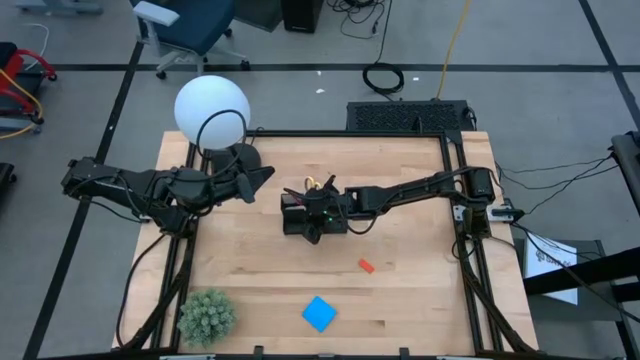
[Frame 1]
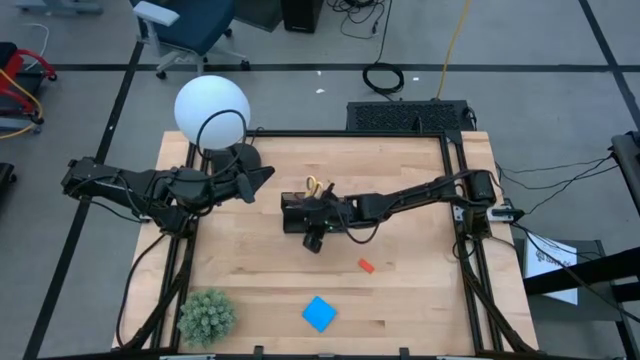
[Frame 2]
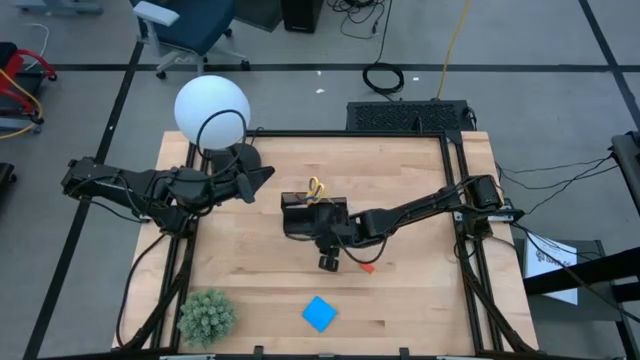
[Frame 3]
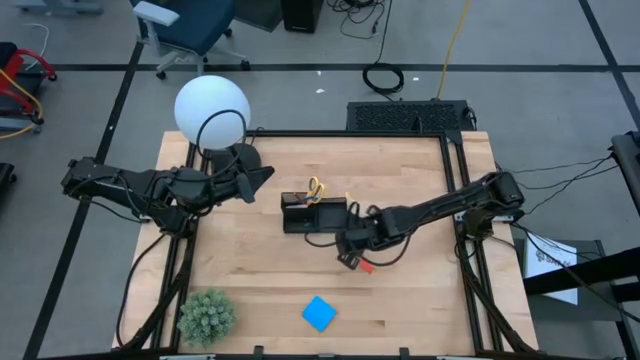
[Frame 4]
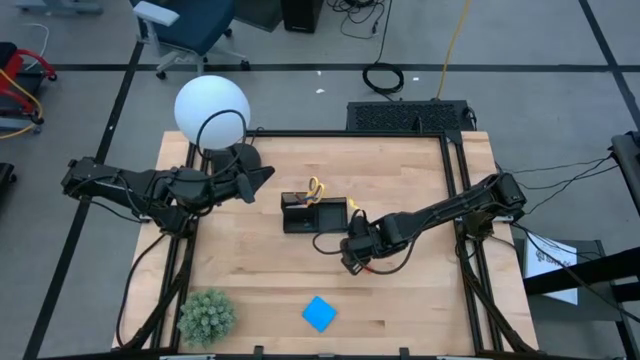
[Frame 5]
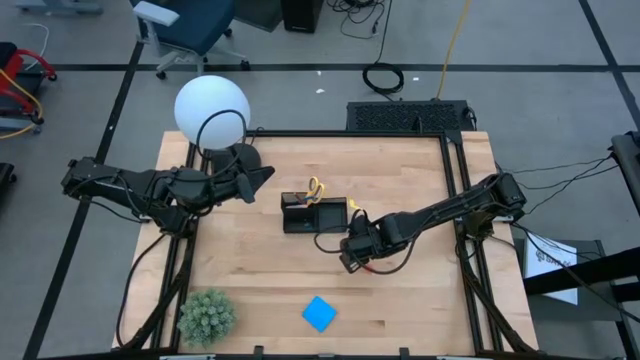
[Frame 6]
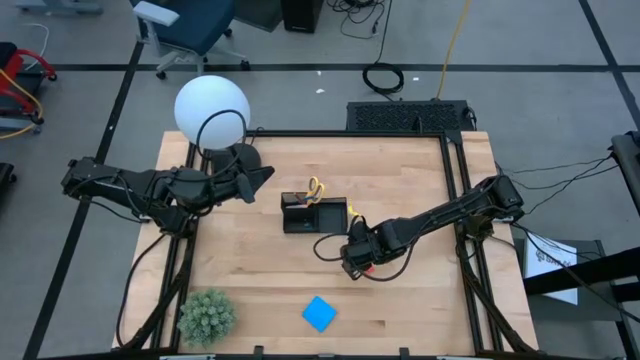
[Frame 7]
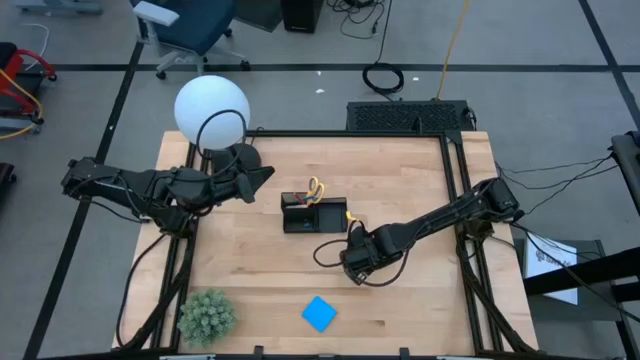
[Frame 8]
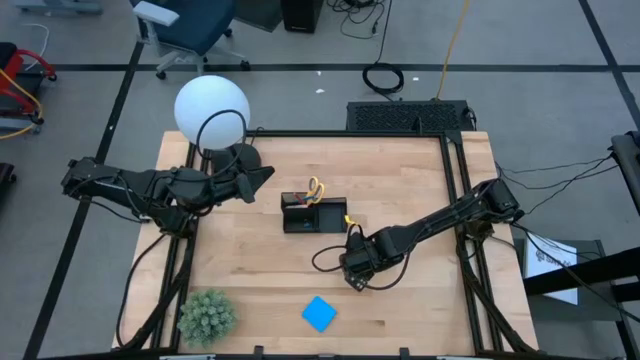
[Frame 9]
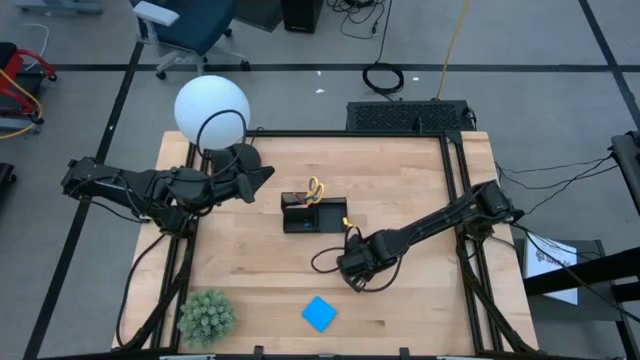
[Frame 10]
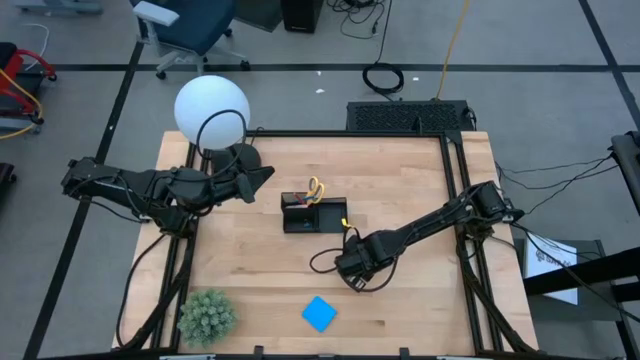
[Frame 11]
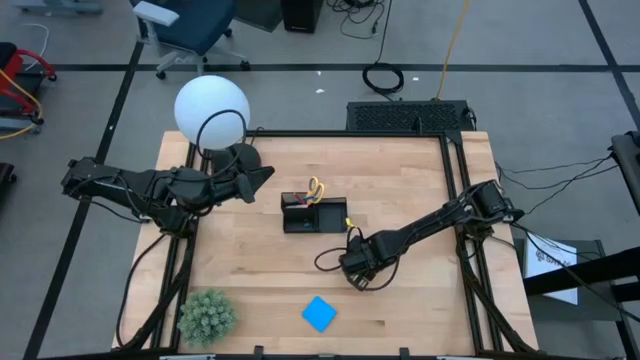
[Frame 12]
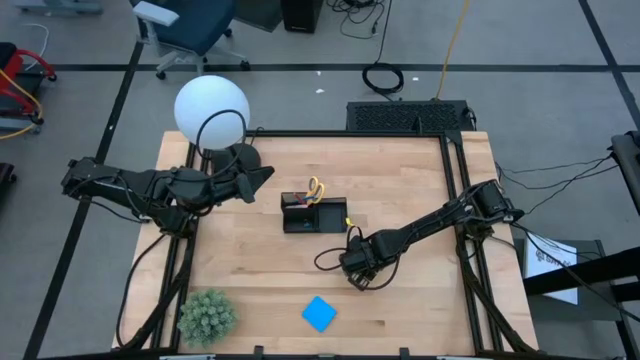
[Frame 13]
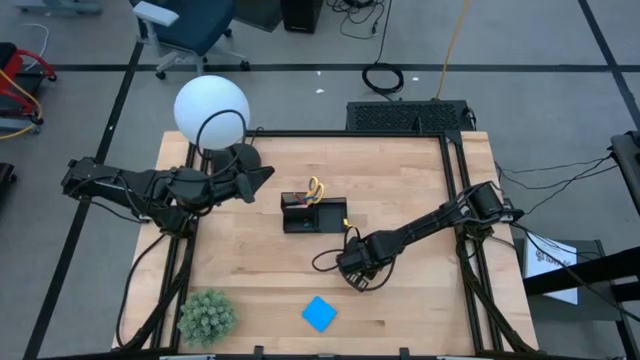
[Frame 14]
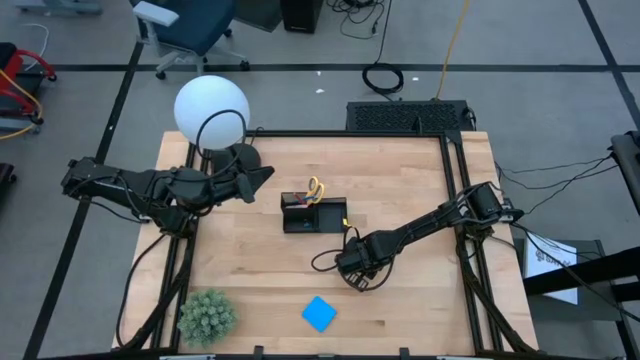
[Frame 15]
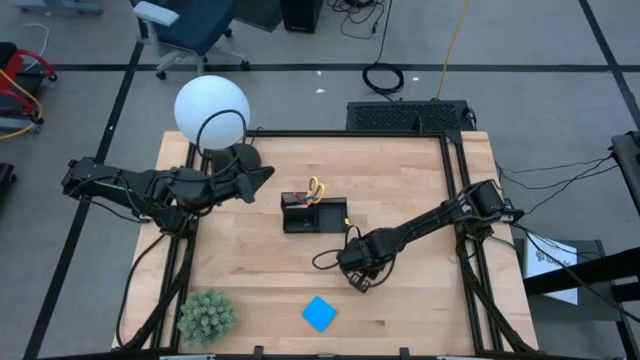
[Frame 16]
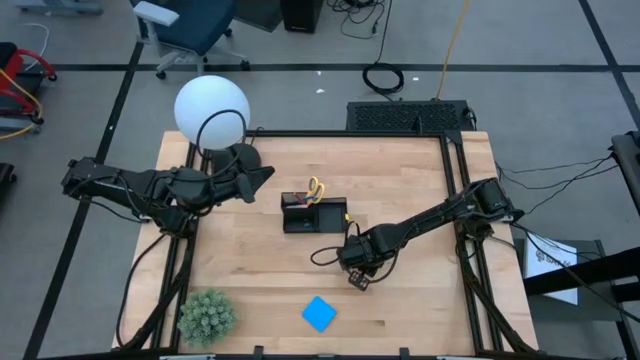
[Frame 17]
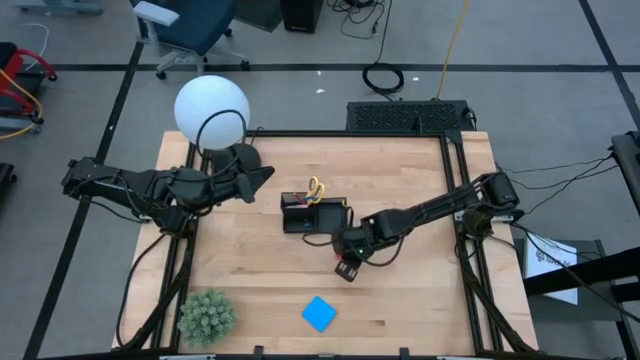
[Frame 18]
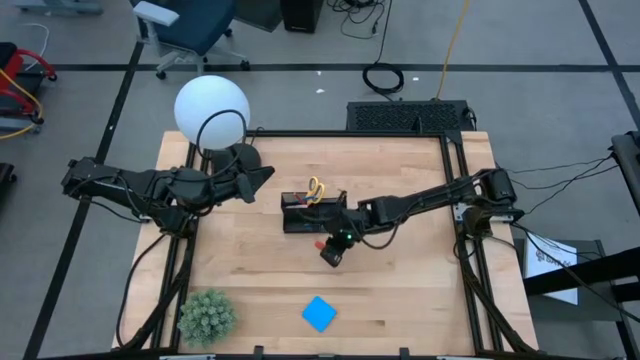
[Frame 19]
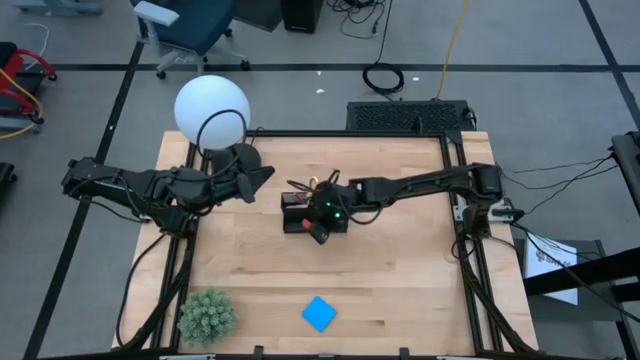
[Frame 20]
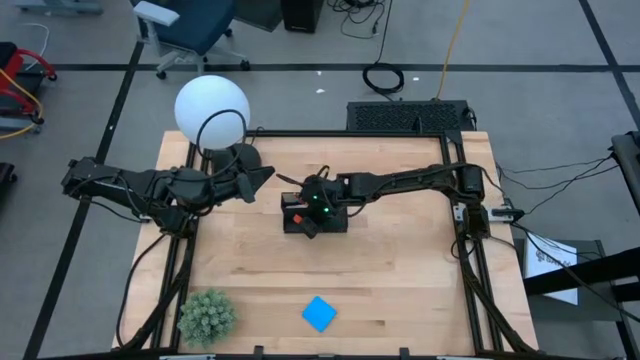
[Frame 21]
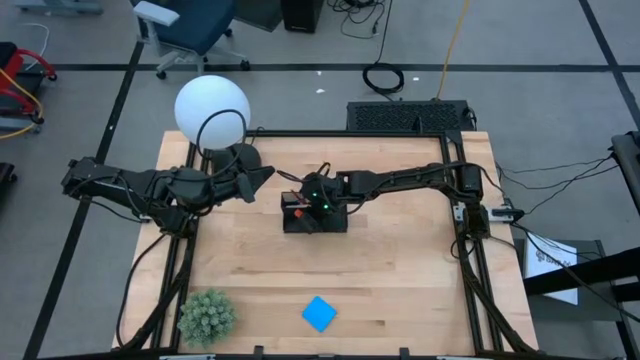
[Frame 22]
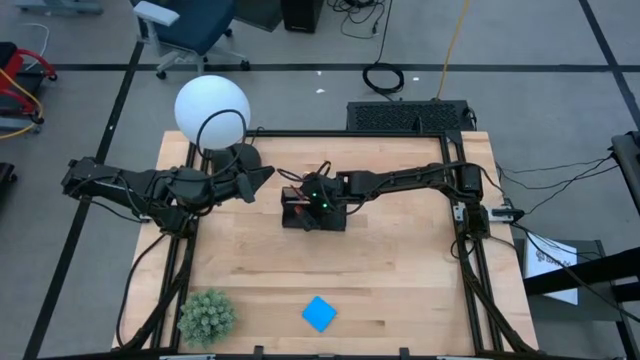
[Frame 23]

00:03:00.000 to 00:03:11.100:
Task: Pick and place office supplies into organizer
Put the orange eraser into the desk organizer

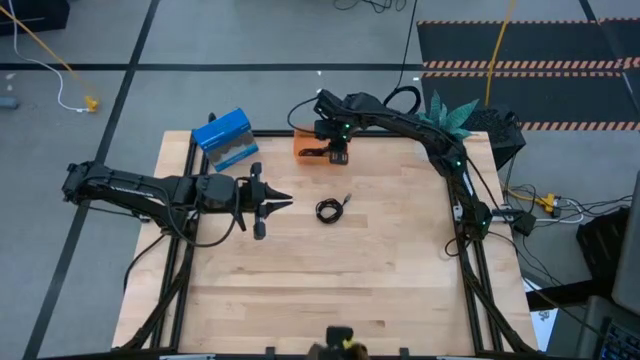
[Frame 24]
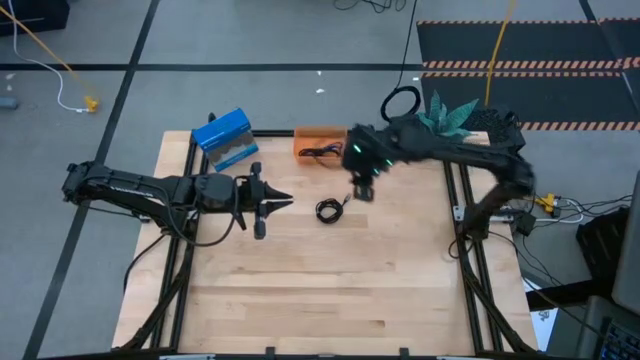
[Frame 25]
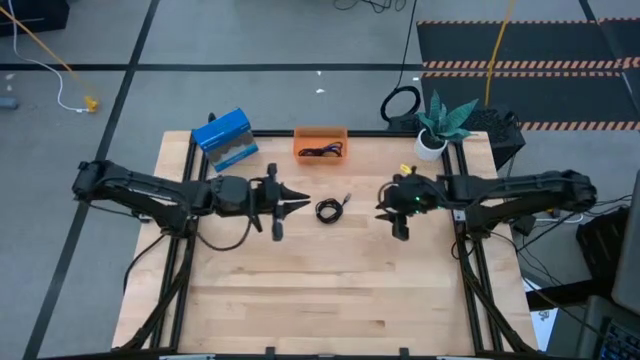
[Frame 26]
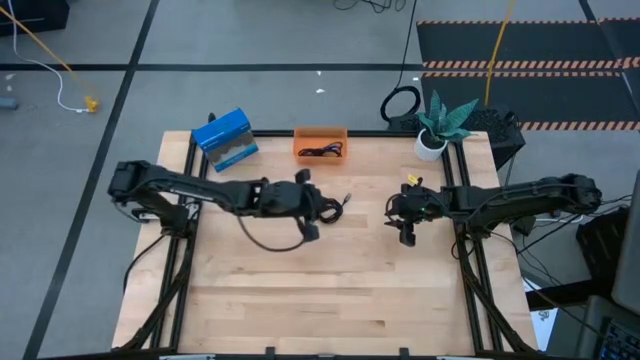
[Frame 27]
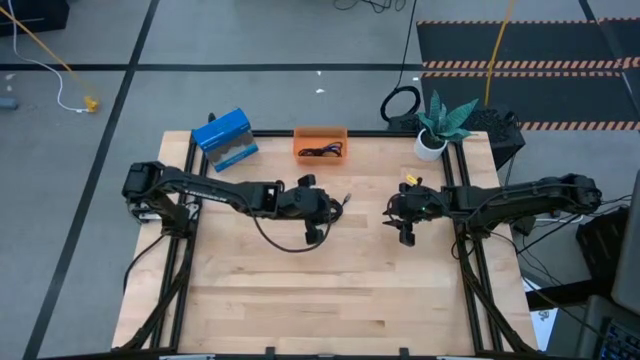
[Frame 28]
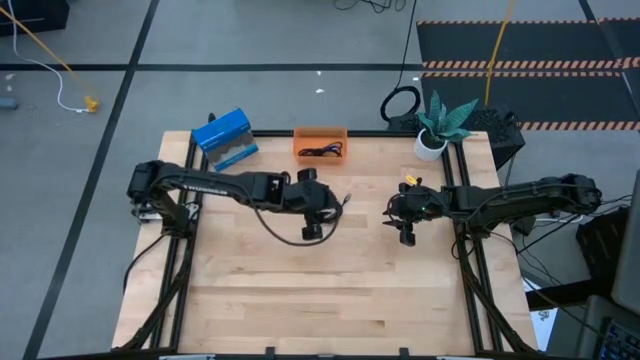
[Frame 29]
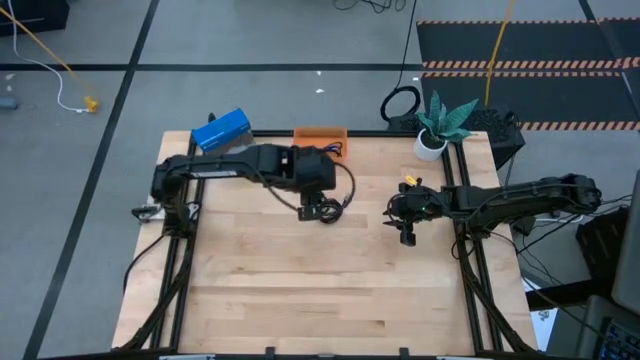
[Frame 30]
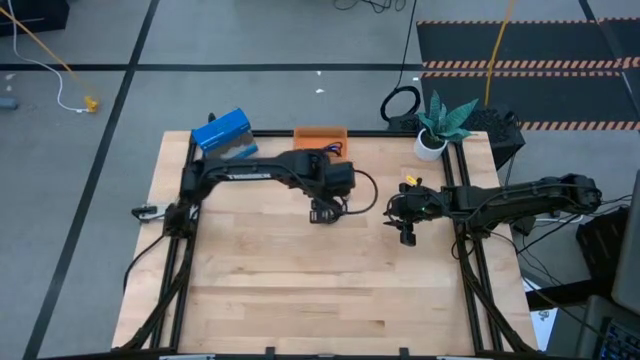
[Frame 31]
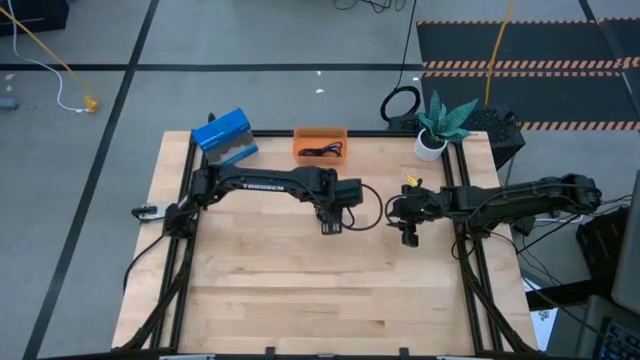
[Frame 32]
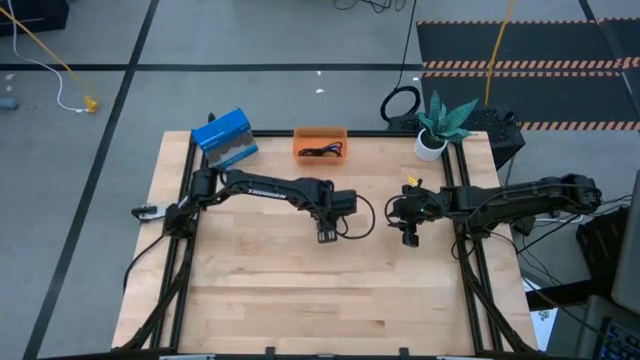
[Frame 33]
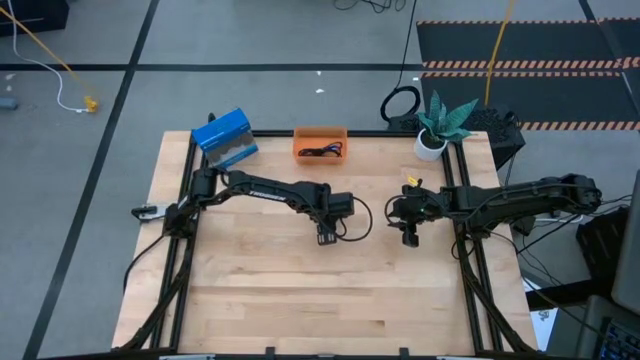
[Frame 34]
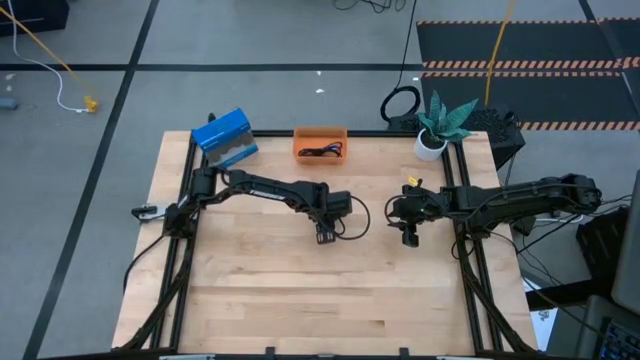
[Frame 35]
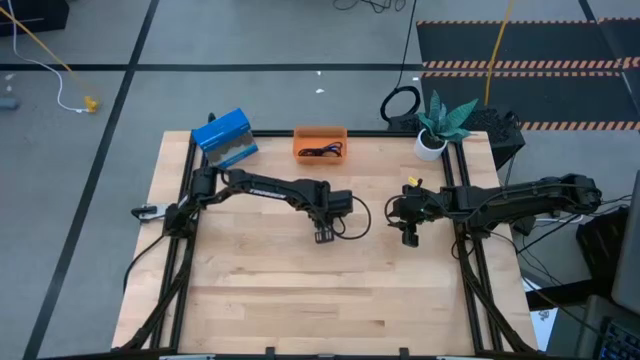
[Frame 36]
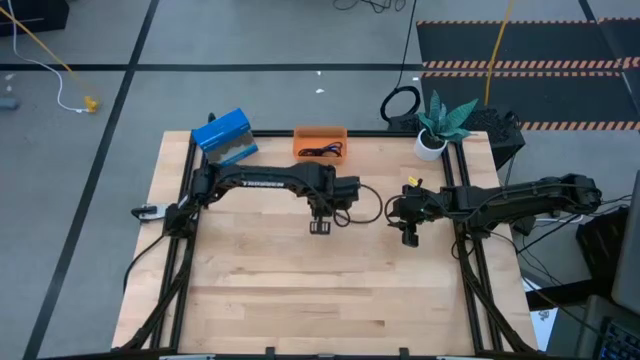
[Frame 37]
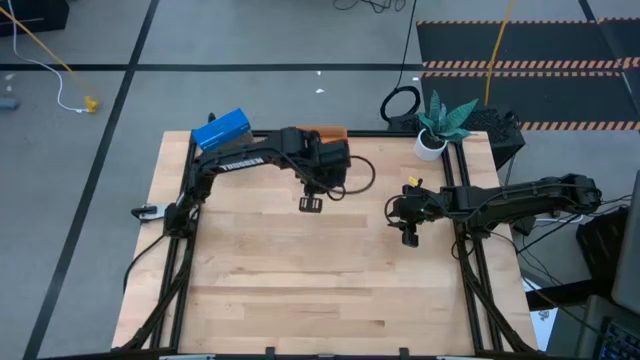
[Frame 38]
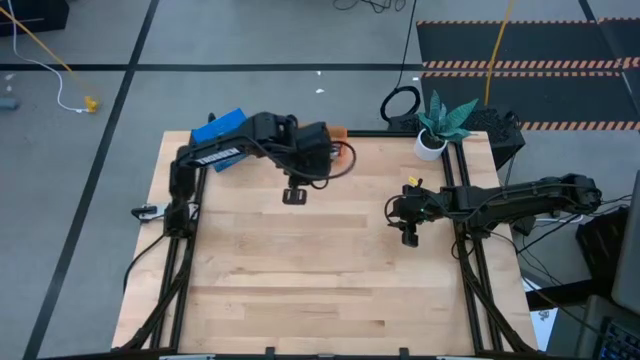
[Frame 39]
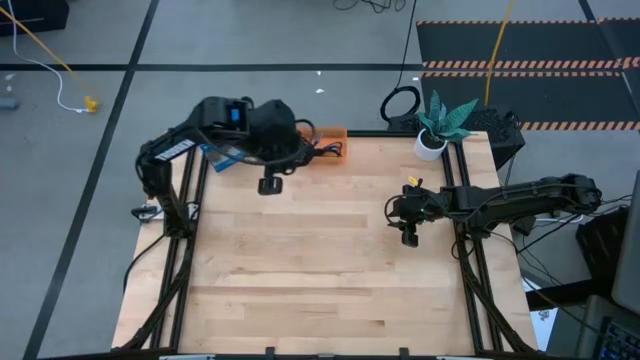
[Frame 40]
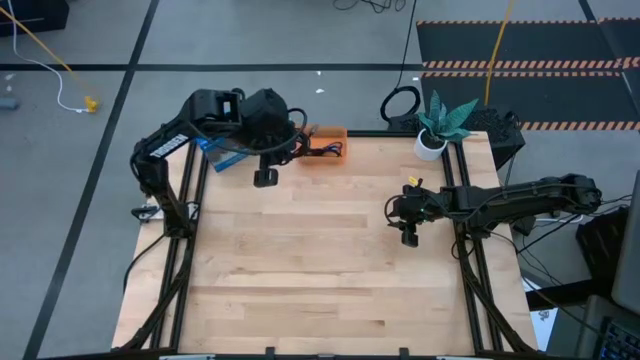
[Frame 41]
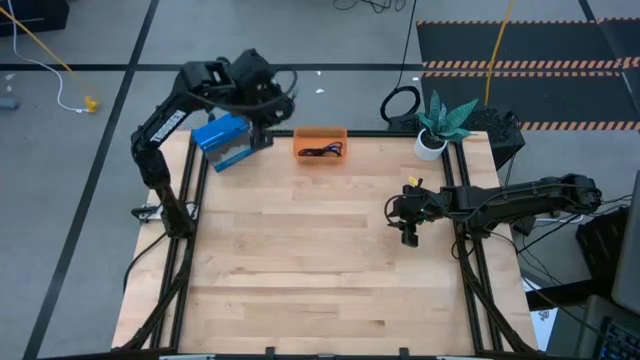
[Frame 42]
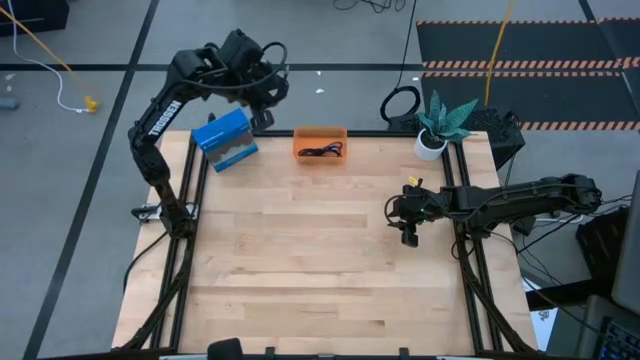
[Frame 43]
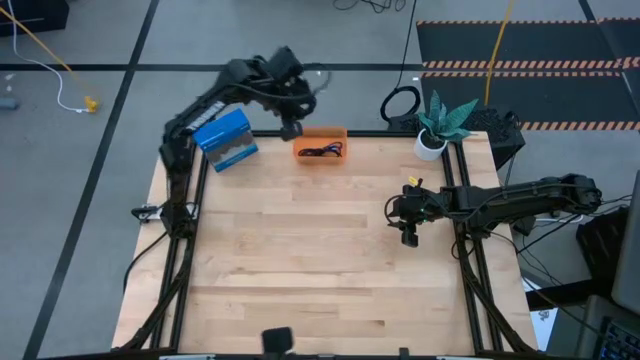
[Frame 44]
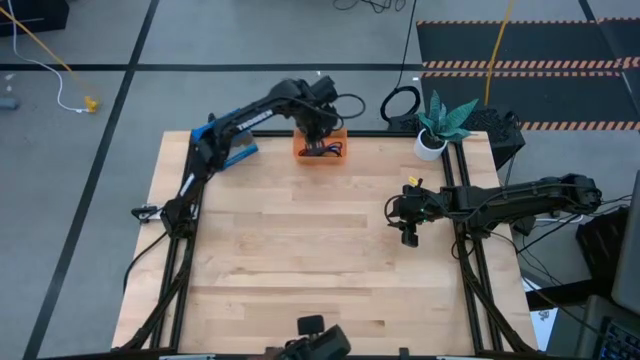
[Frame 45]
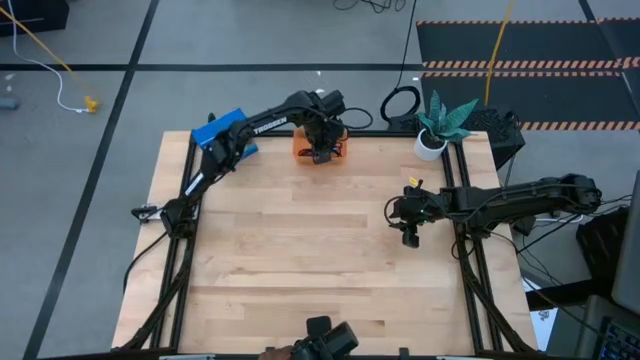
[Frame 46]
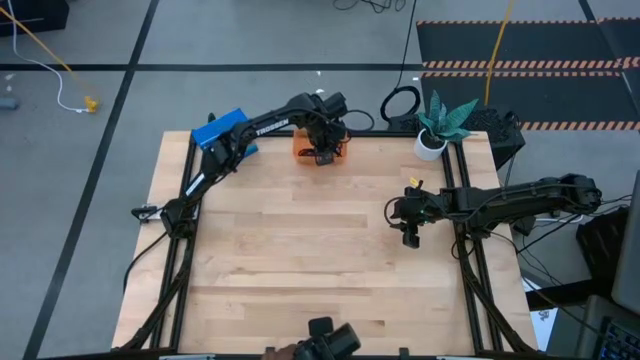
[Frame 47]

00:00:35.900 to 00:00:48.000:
Task: Pick and place USB-C Cables
Put the black charger cable into the orange bin
